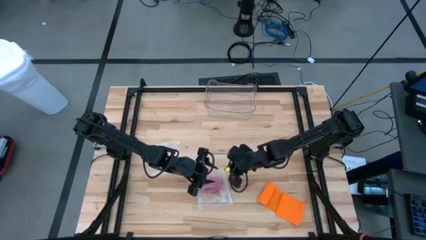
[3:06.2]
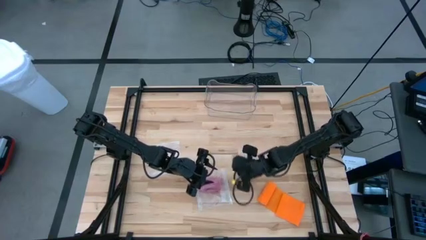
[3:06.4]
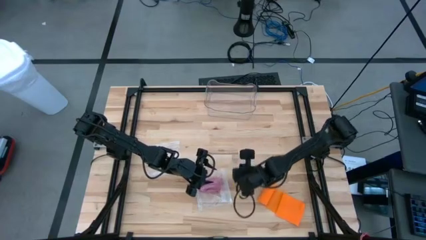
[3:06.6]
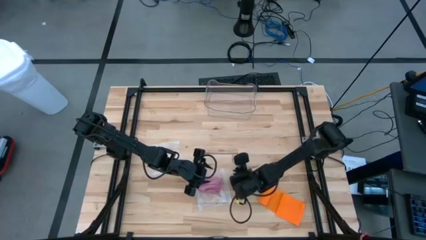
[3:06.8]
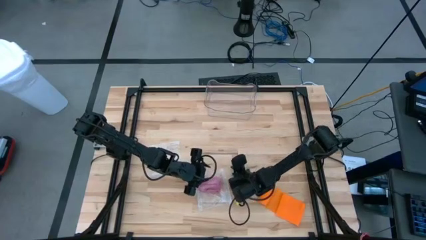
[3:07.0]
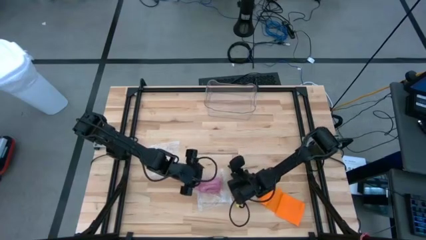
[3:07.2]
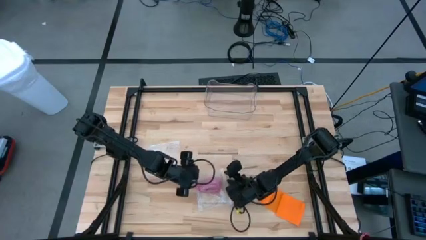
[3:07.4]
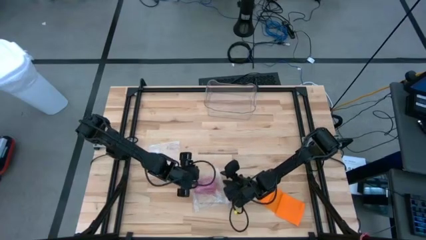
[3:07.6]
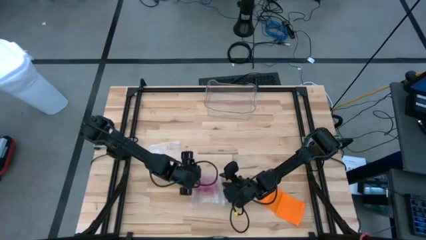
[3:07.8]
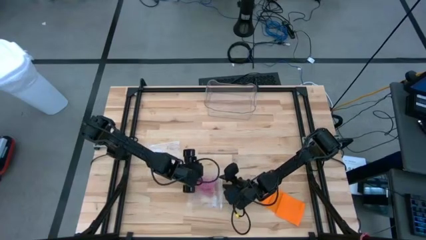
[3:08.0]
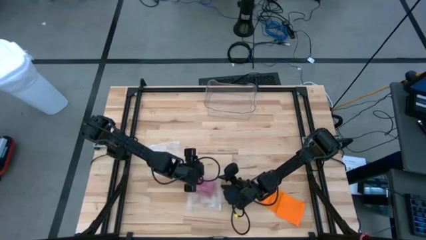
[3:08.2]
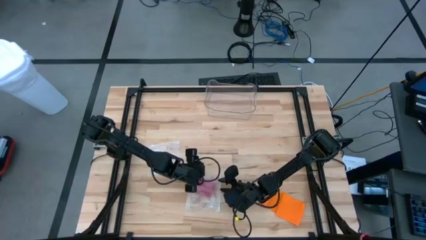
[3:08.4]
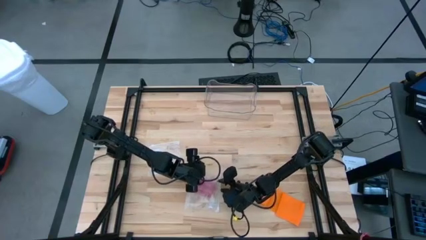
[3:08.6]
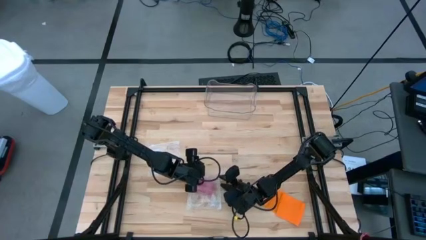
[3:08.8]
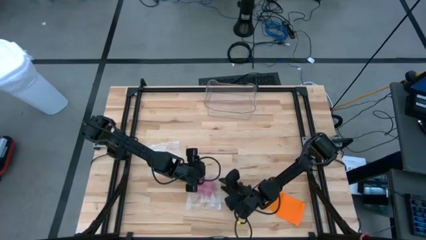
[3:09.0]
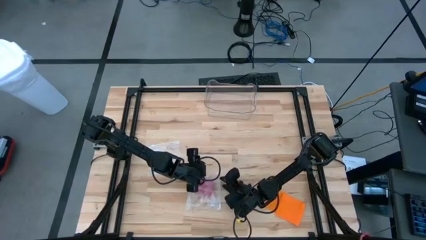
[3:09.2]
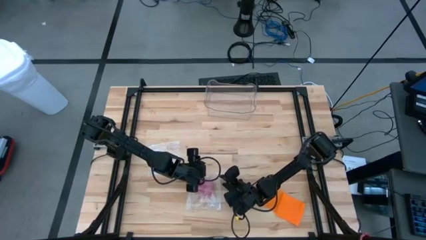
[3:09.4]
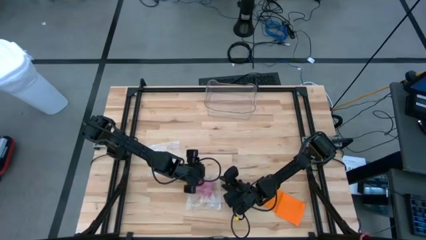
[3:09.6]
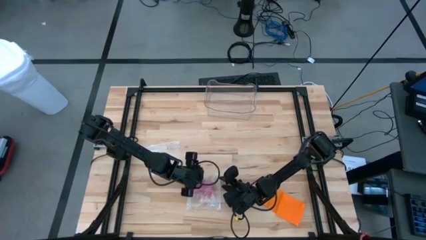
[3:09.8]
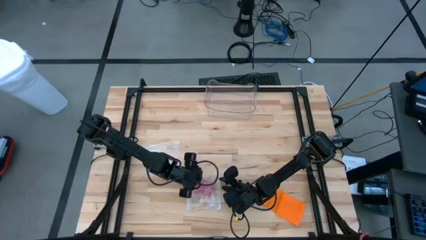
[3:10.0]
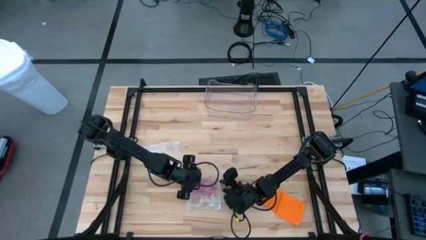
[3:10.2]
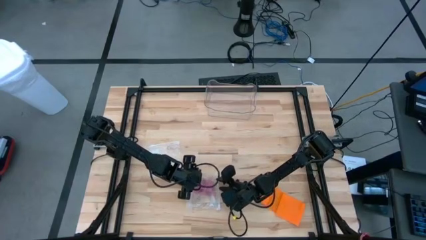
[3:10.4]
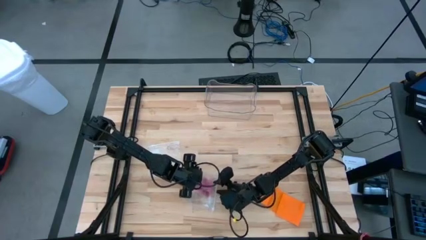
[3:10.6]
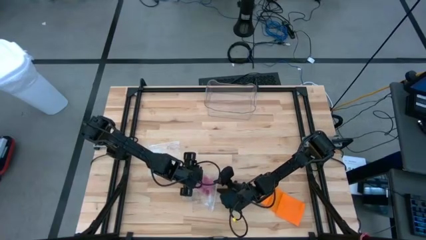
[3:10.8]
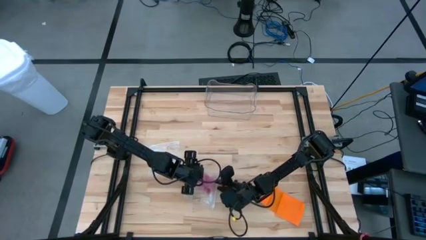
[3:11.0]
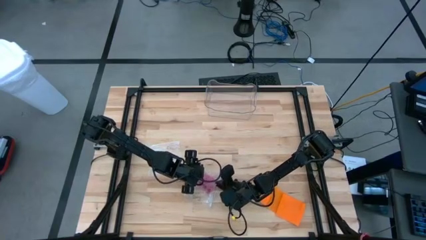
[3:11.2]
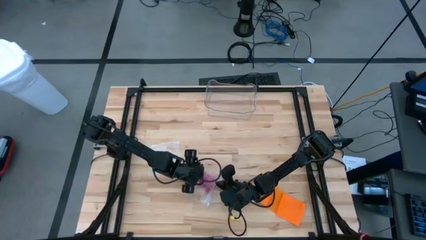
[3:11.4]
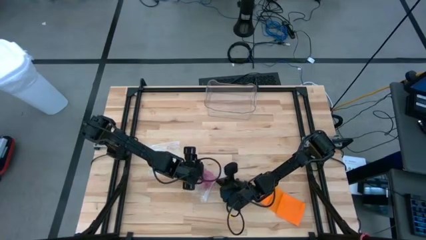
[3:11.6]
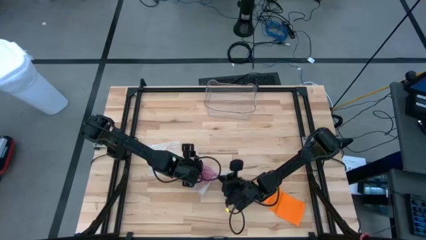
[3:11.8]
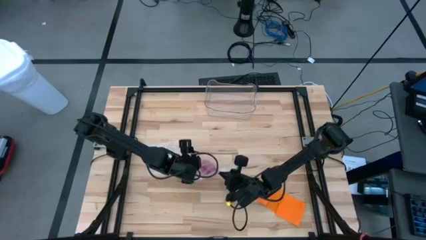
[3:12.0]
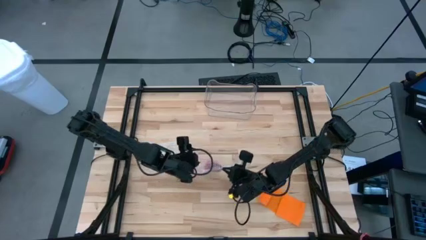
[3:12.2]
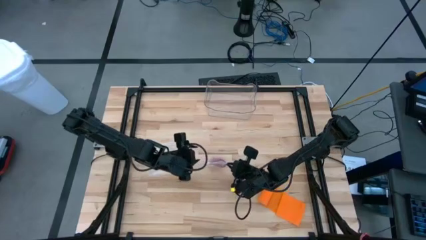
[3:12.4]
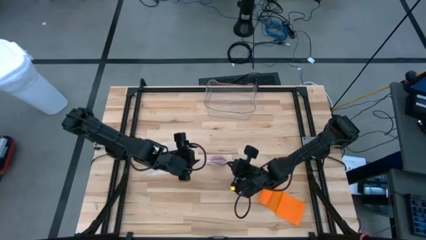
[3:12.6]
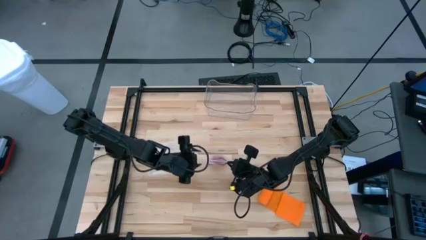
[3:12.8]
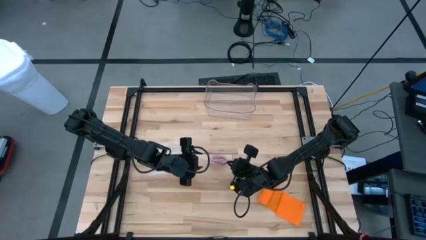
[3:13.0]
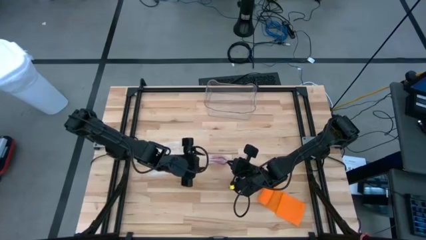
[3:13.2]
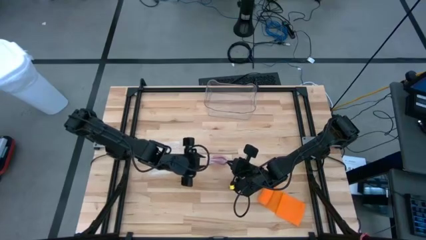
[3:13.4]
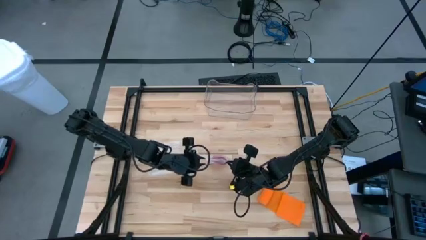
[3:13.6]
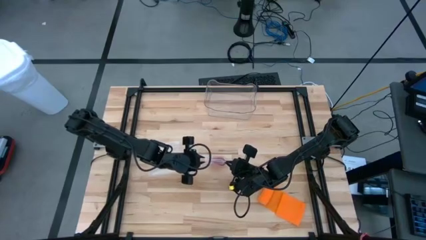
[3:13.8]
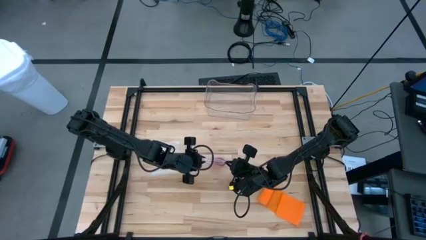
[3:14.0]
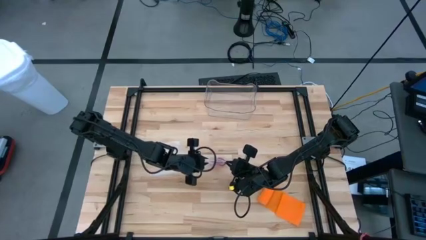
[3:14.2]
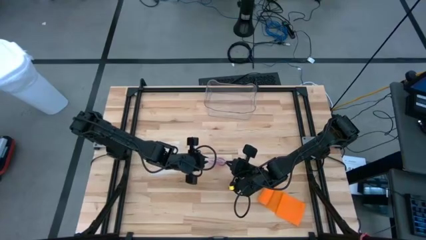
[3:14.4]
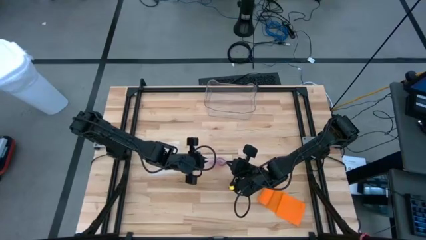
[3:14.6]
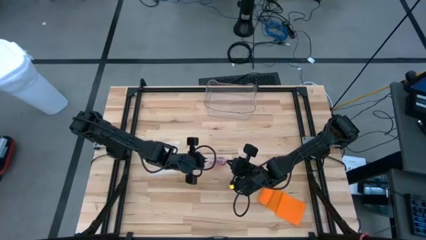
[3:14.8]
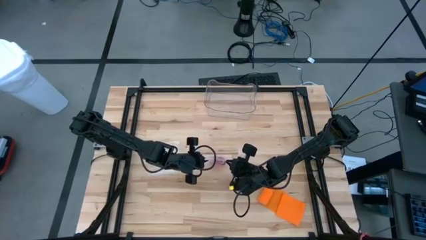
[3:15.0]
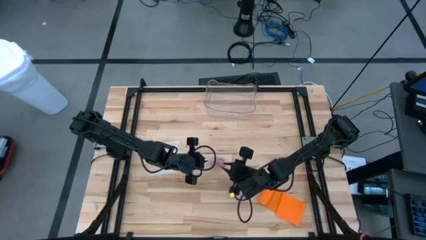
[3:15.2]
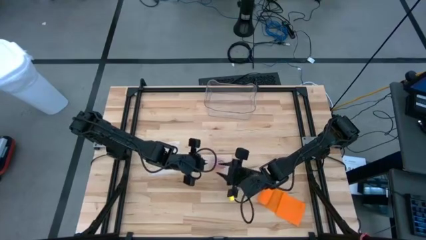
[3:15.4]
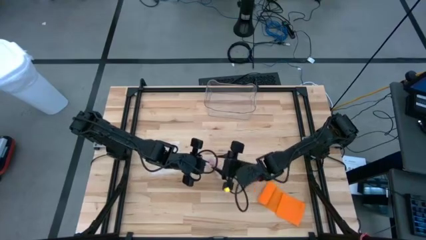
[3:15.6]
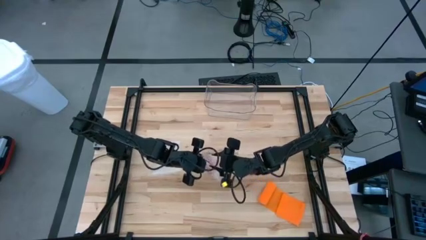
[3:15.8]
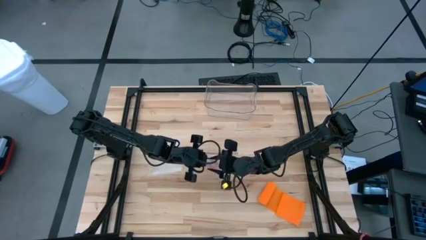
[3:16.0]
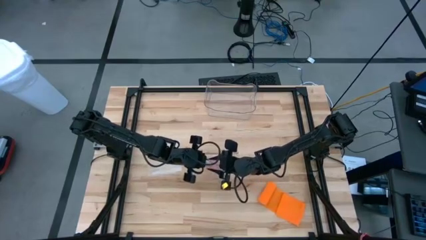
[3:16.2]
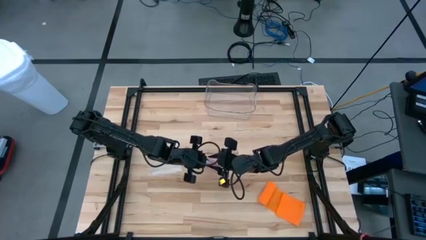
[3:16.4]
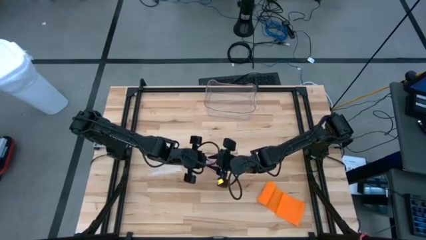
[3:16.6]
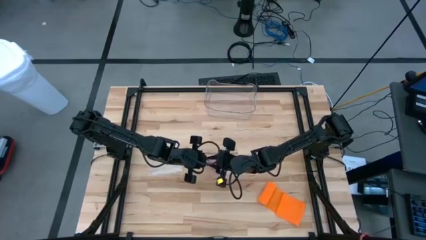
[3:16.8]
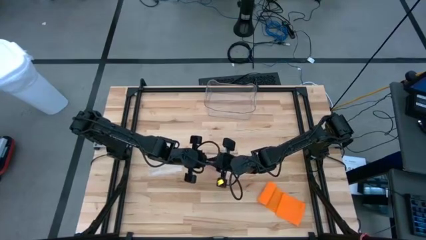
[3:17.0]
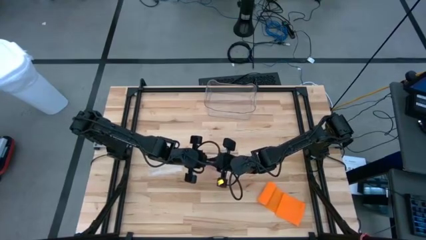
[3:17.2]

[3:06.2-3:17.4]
Task: Roll bandage
Close the zip bag
